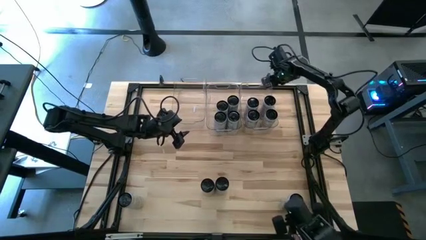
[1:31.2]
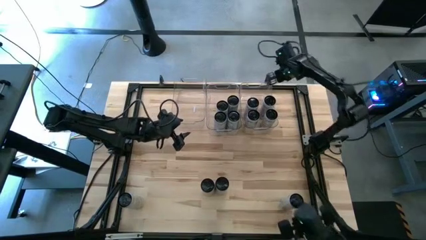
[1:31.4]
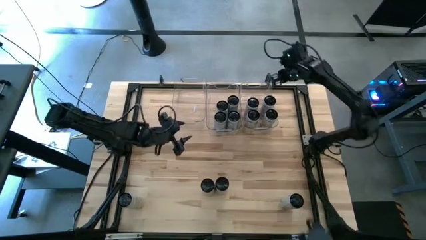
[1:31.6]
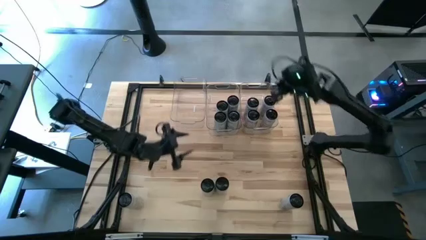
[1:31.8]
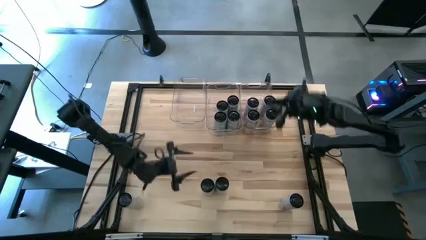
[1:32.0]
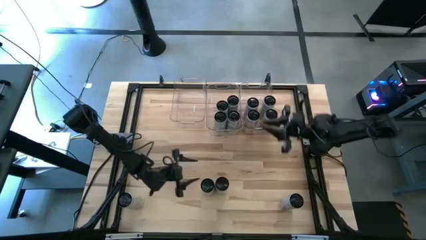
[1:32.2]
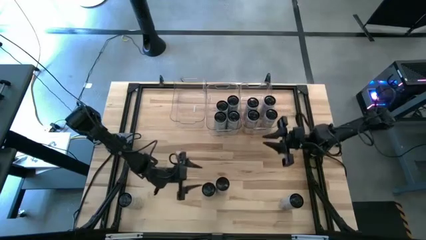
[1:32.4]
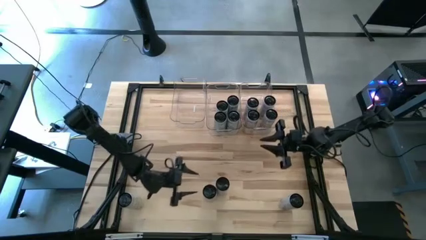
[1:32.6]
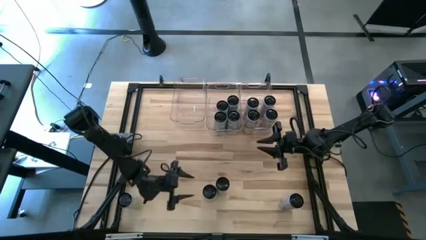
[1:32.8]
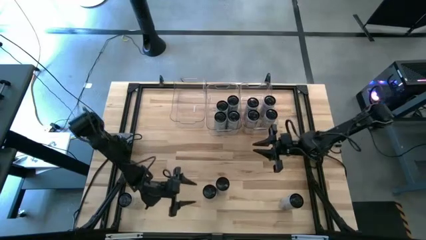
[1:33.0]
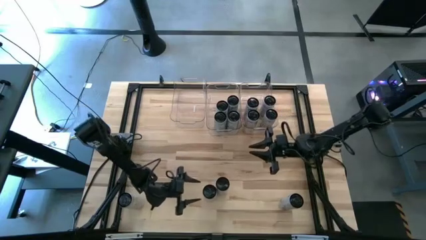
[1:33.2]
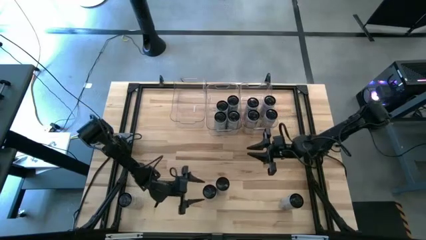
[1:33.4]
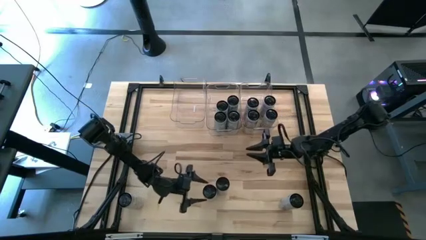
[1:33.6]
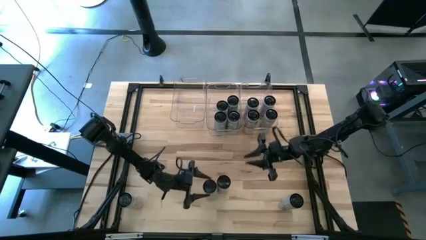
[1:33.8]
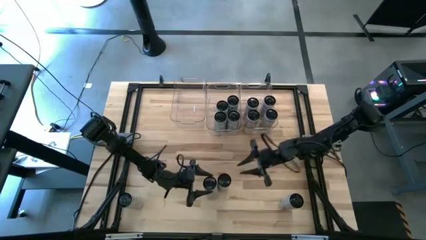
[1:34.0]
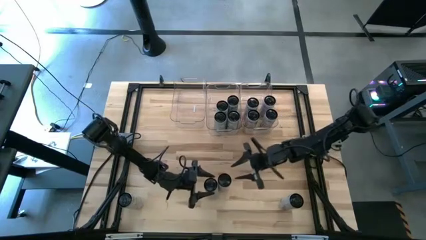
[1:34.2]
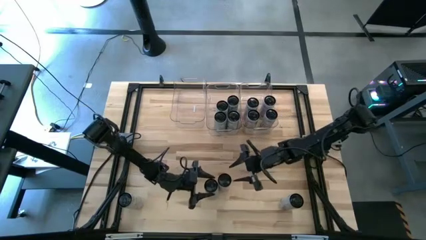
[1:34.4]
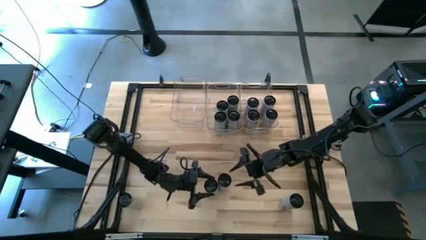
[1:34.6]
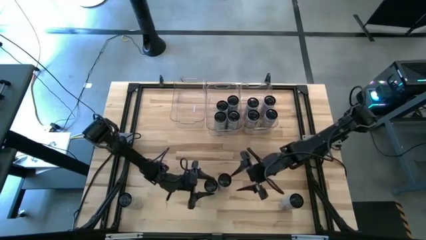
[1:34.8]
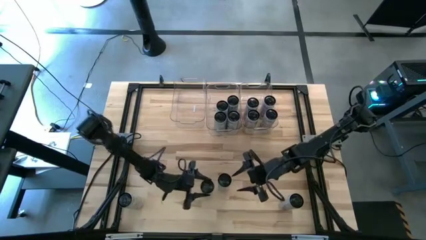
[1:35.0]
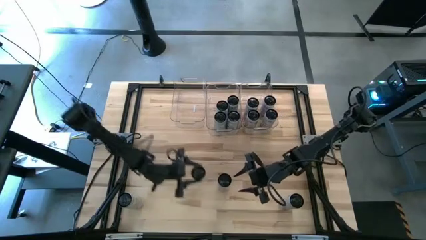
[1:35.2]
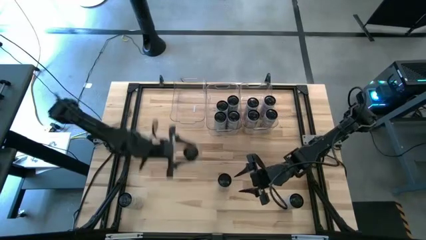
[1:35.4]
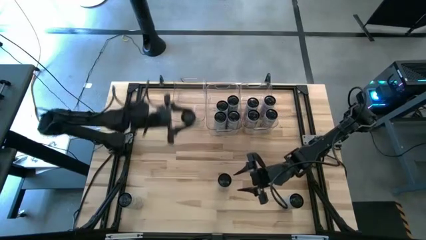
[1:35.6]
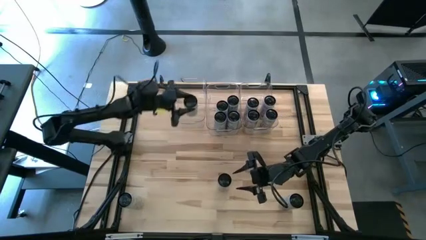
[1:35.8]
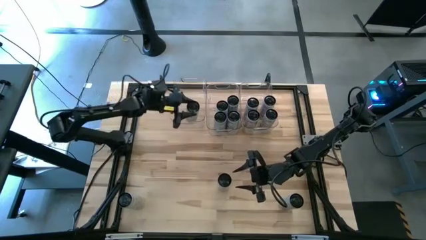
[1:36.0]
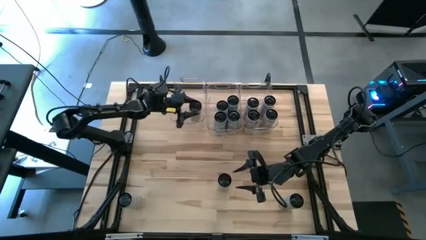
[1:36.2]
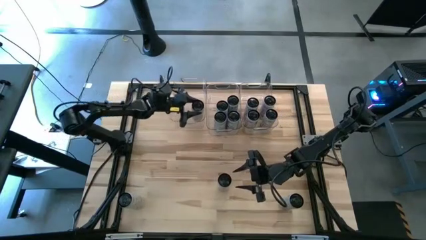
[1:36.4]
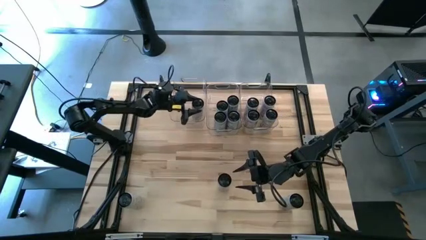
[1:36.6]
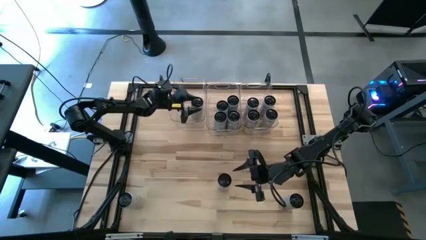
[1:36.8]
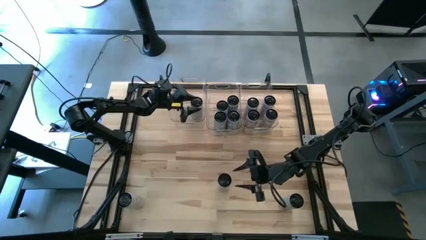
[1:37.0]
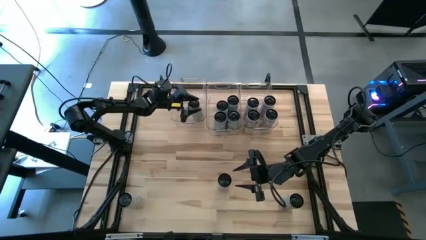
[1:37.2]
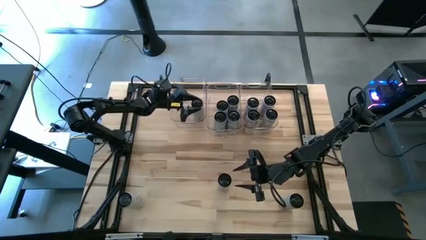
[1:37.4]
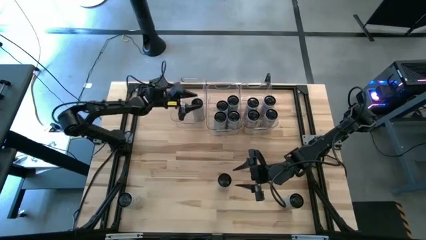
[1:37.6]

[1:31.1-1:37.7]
Task: Sort soda cans
Put the top left white-yellow soda can into the left transparent bin

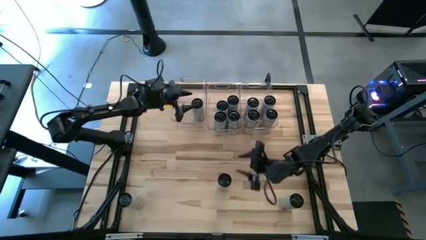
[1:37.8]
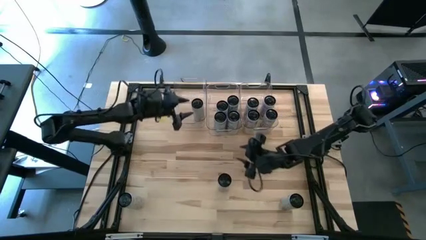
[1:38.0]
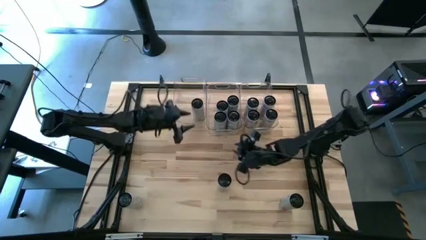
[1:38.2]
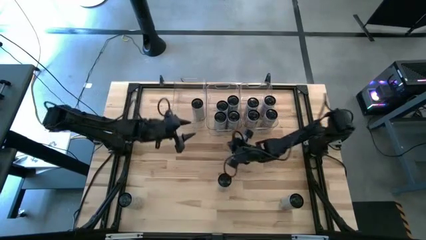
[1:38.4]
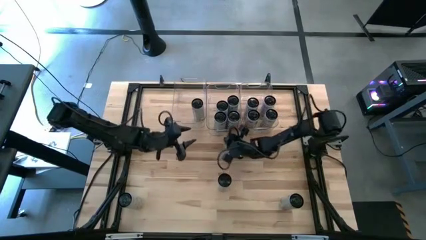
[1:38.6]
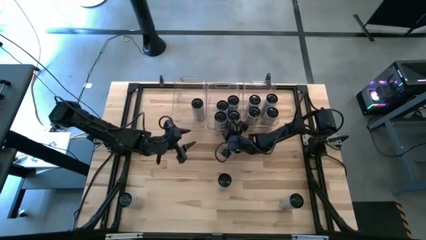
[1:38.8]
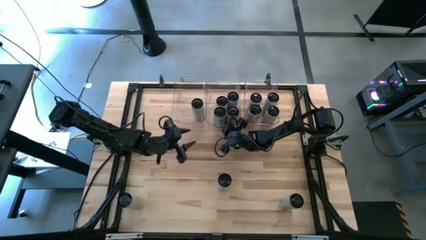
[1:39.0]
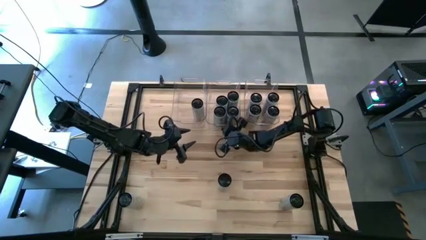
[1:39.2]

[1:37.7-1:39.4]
Adjust the transparent bins on the table

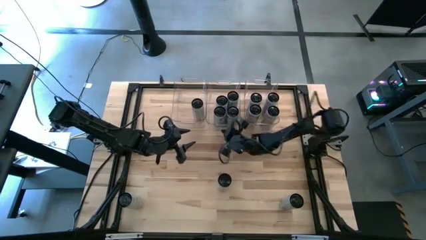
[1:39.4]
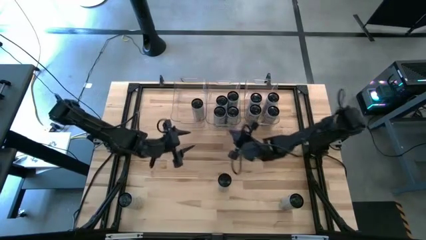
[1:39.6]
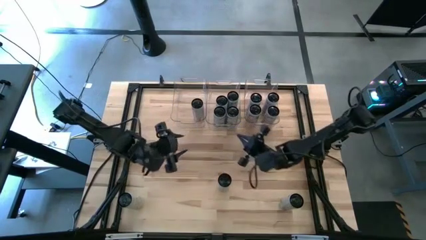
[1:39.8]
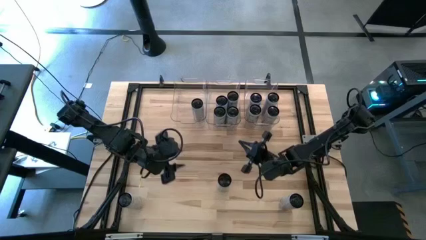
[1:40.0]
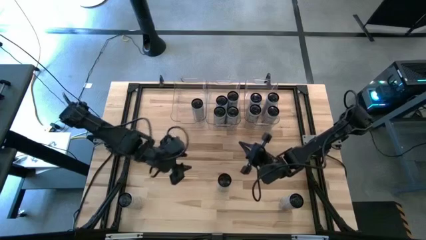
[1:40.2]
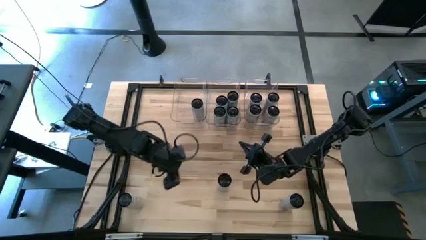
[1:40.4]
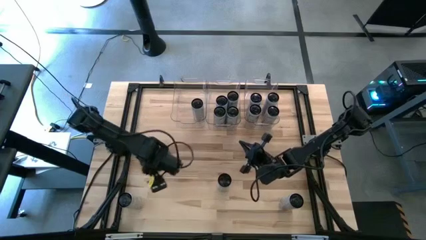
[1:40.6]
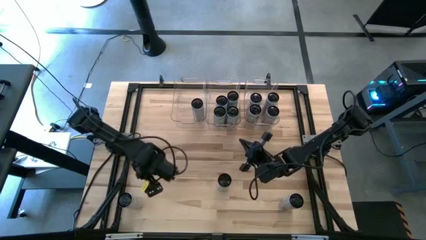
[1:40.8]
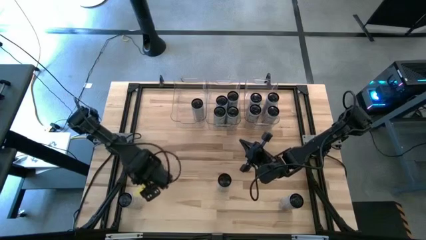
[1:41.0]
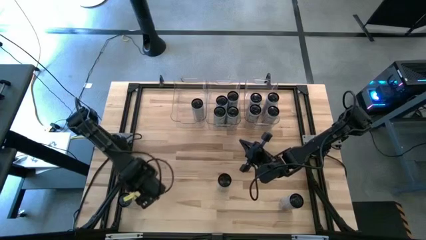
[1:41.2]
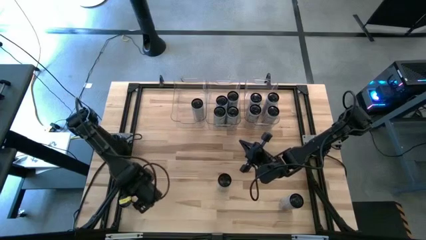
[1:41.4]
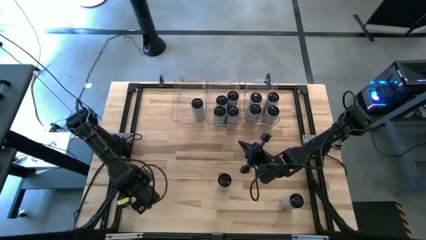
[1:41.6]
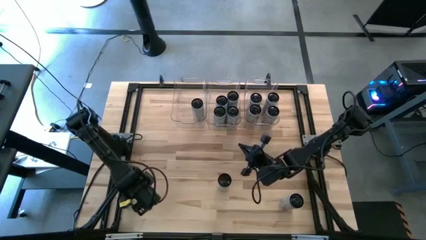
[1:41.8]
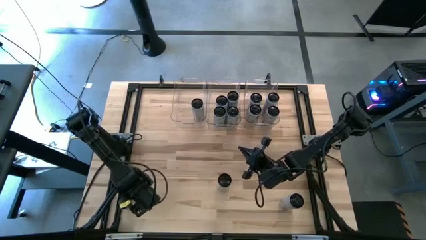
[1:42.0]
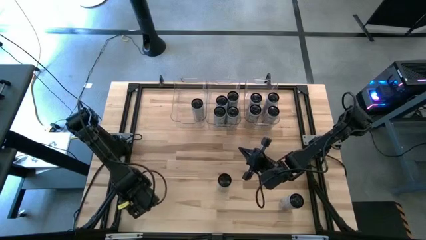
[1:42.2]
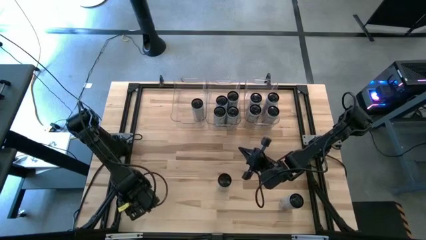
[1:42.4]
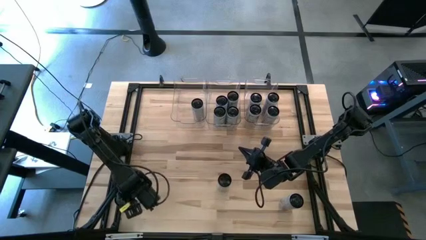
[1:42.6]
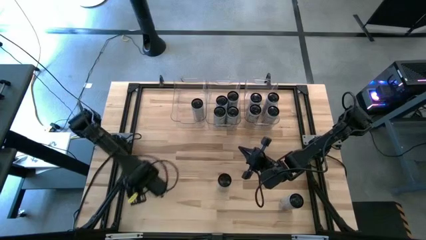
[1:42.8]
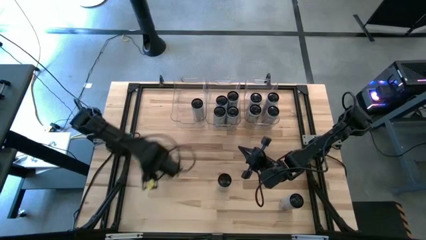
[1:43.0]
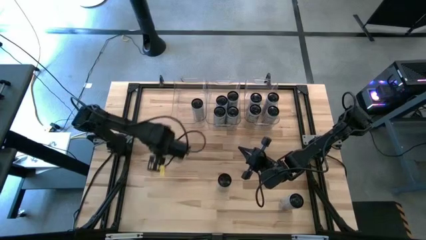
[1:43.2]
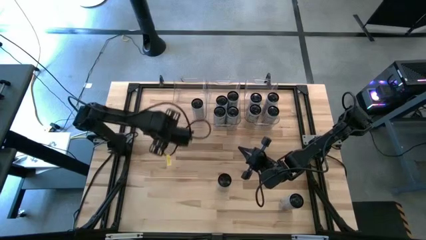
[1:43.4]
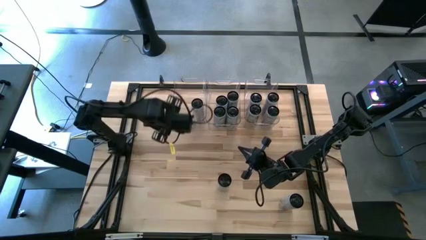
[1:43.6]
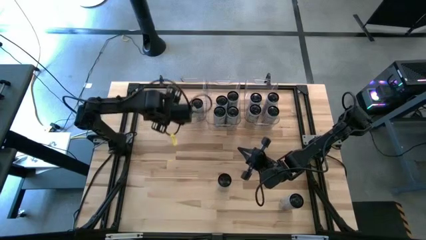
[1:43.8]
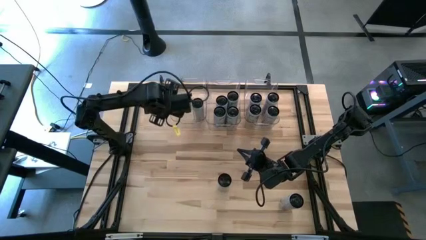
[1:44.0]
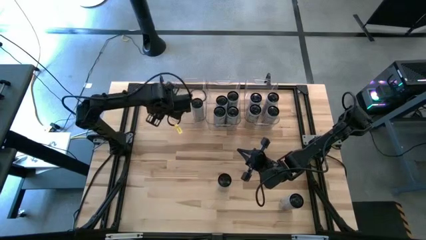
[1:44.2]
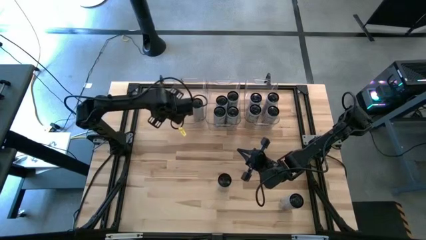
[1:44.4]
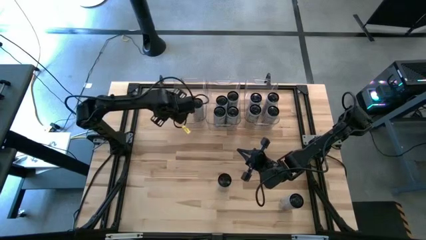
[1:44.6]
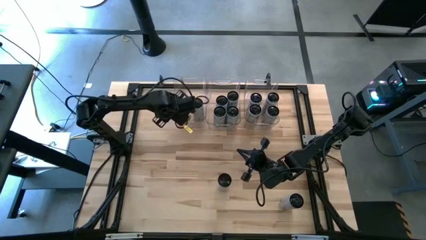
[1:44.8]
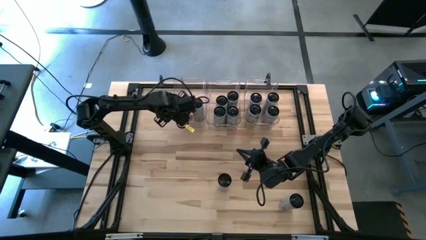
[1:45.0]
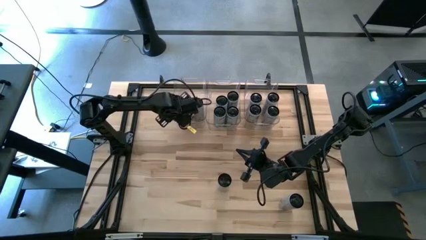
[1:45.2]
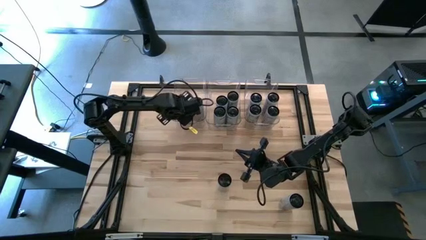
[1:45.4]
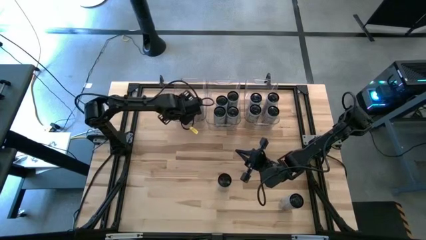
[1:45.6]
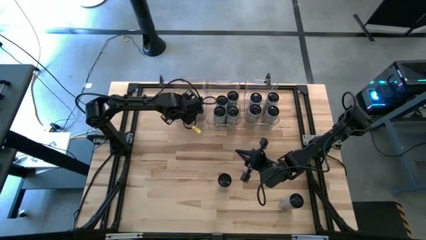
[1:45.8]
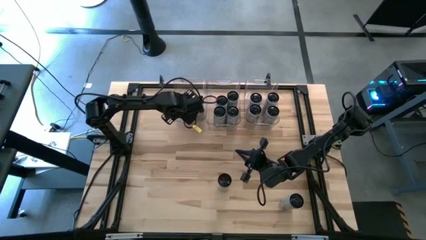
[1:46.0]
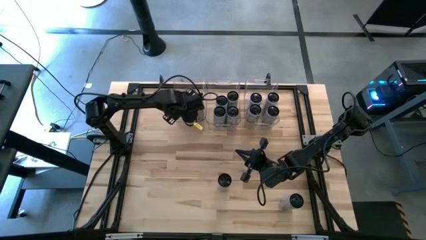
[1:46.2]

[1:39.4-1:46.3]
Put the bottom left white-yellow soda can into the left transparent bin
